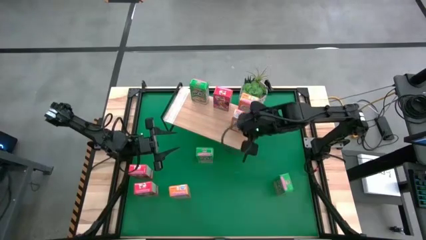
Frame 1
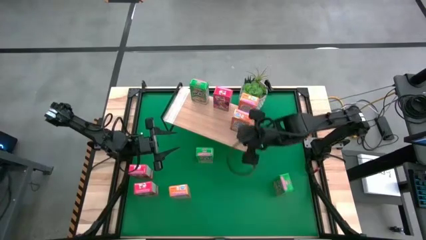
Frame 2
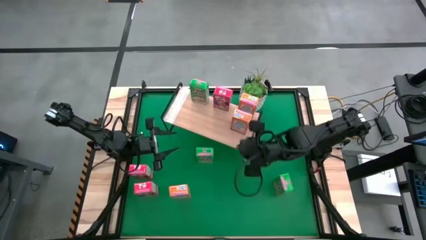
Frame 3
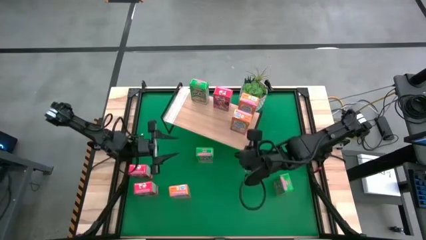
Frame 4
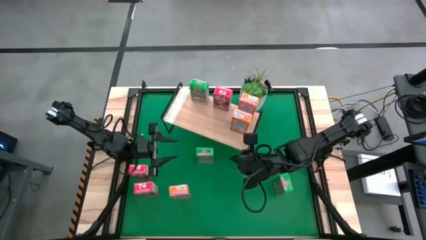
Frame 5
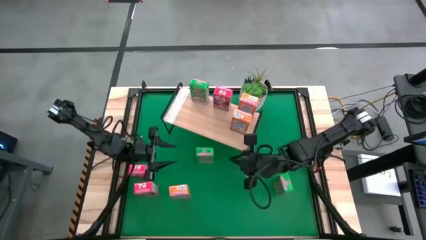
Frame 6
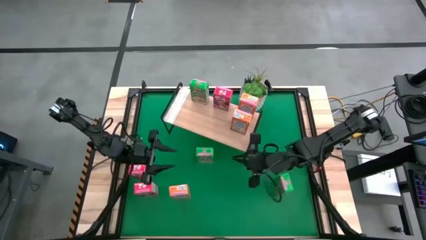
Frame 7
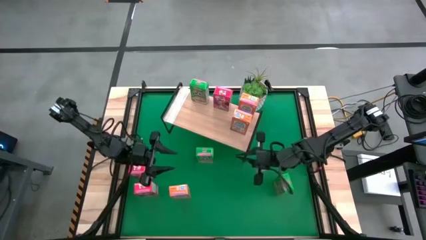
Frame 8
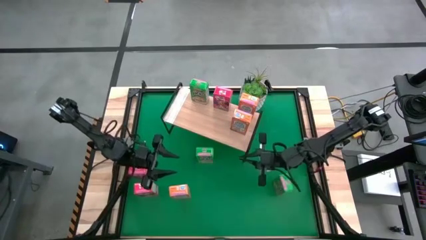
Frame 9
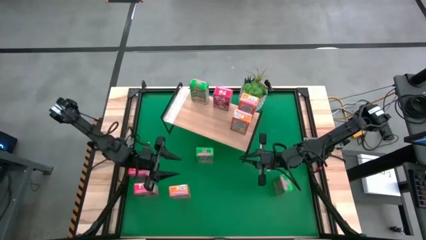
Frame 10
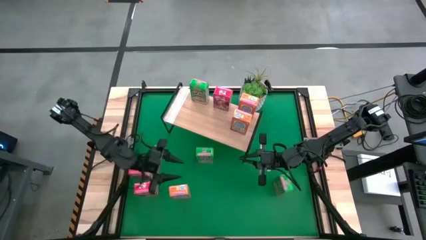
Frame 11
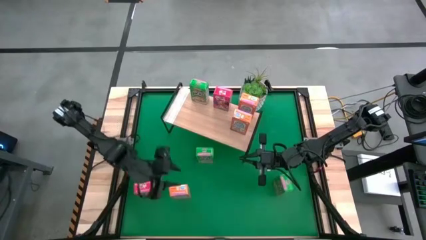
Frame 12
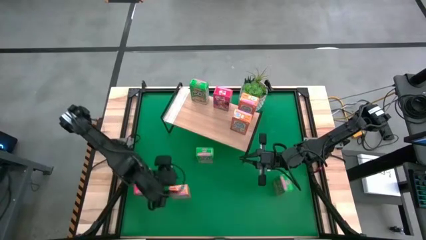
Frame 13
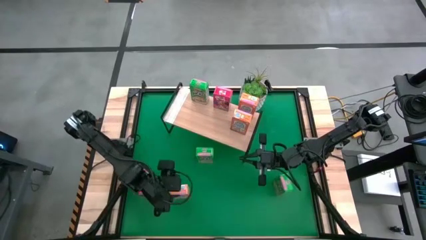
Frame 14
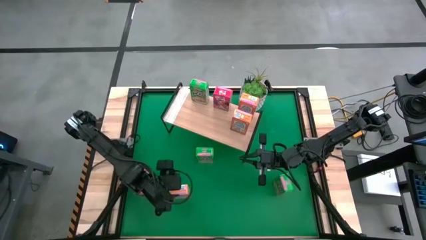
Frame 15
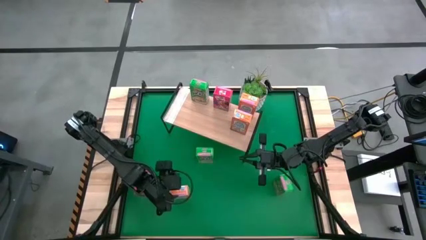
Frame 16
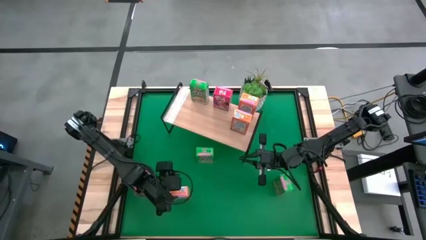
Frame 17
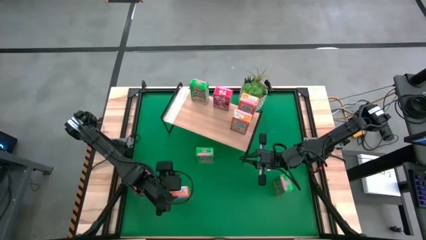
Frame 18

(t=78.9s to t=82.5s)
Task: Stack cereal on shelf
Put the orange cereal box aligned with the other orange cereal boxes on the shelf

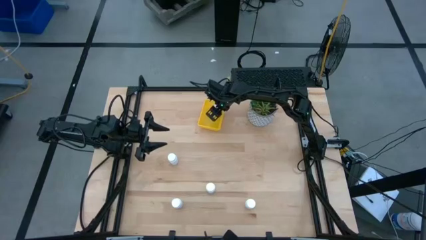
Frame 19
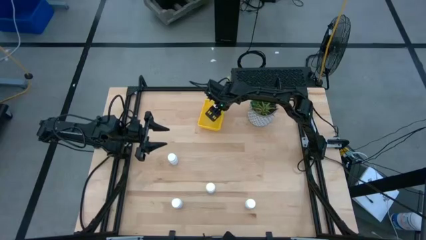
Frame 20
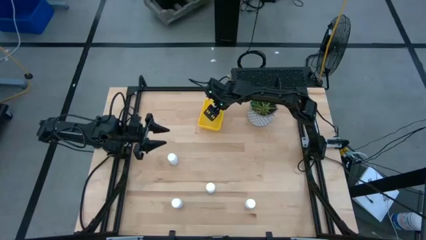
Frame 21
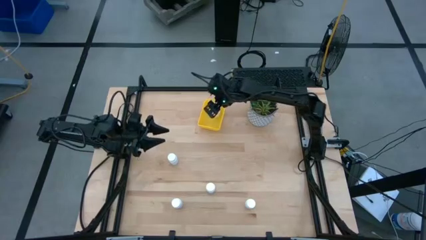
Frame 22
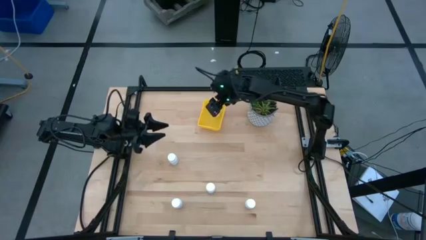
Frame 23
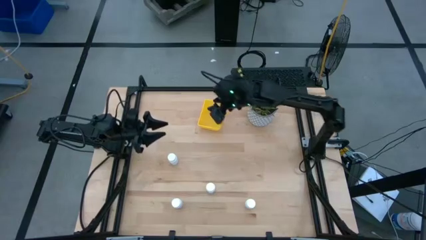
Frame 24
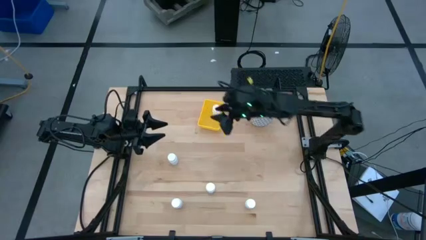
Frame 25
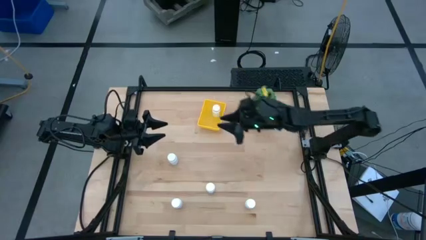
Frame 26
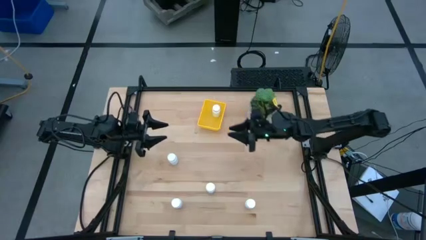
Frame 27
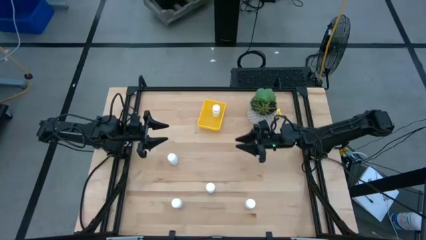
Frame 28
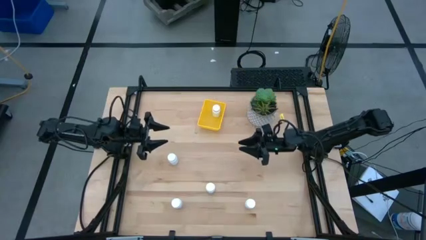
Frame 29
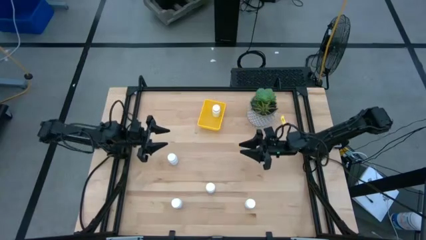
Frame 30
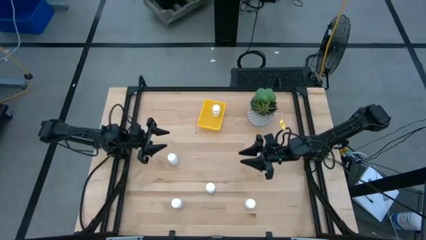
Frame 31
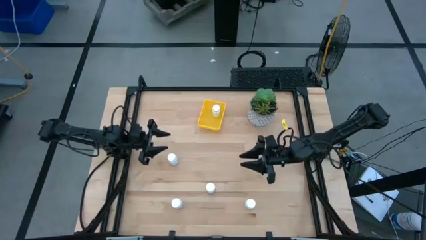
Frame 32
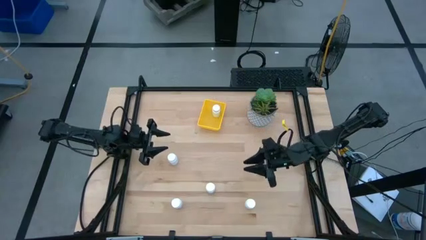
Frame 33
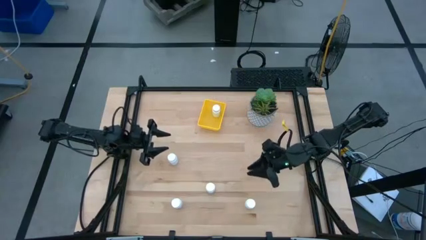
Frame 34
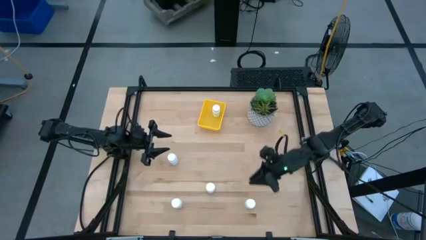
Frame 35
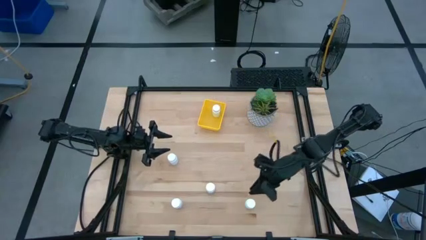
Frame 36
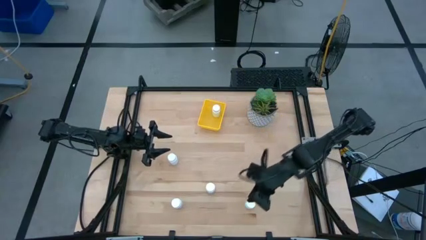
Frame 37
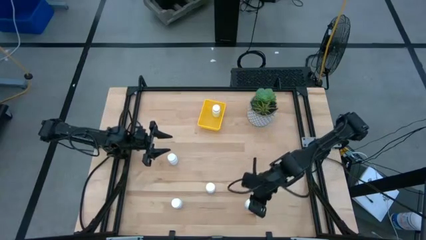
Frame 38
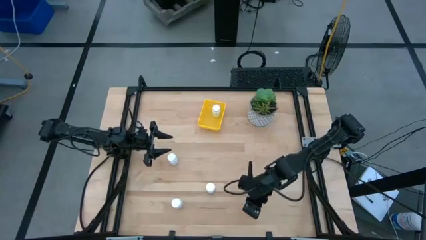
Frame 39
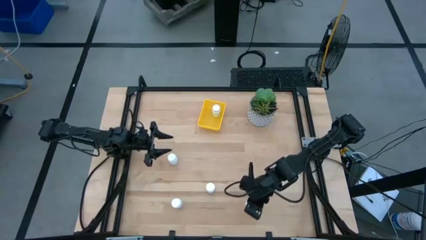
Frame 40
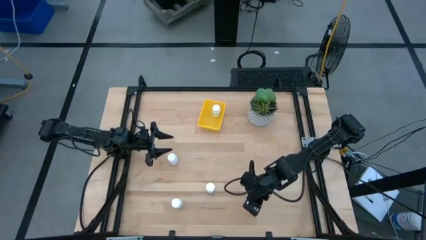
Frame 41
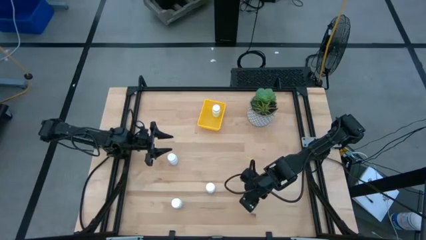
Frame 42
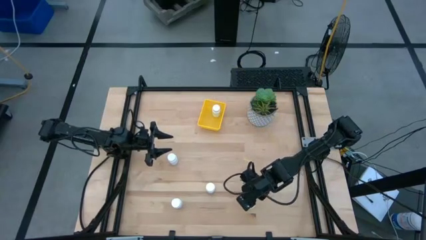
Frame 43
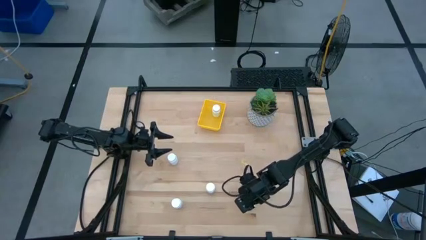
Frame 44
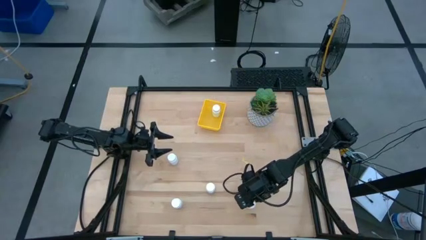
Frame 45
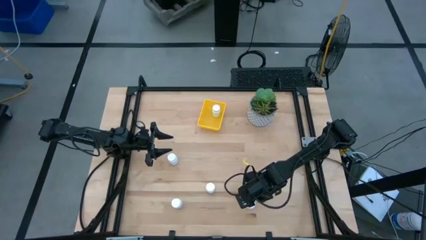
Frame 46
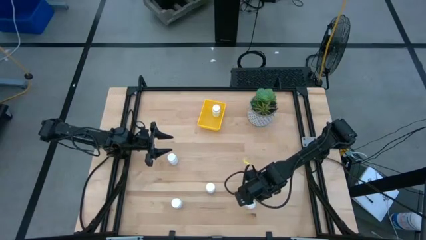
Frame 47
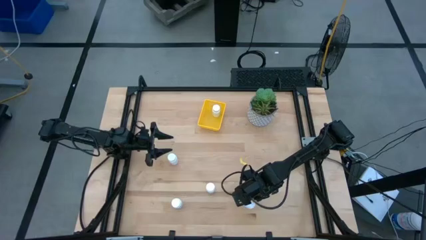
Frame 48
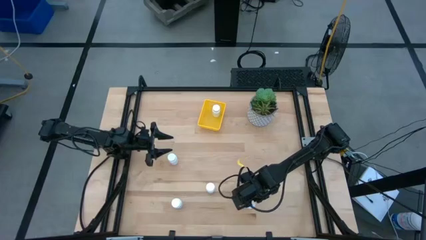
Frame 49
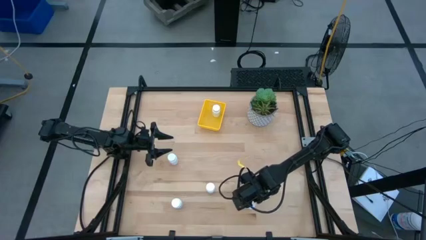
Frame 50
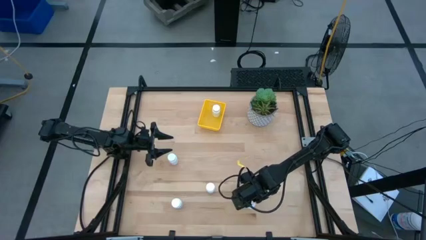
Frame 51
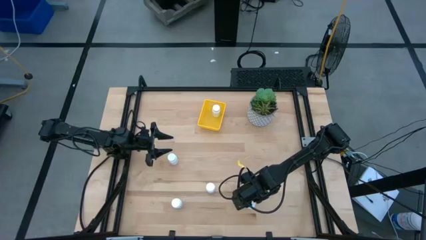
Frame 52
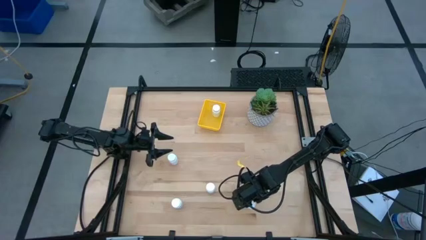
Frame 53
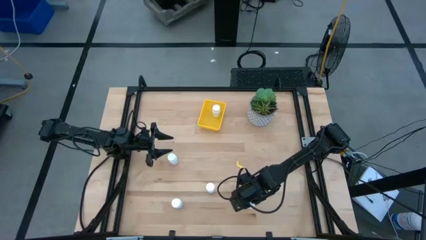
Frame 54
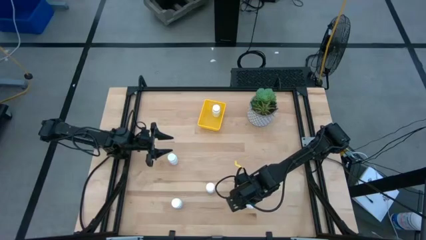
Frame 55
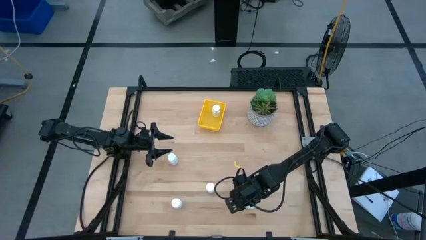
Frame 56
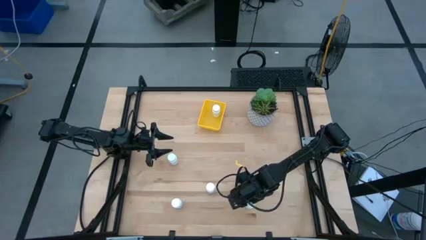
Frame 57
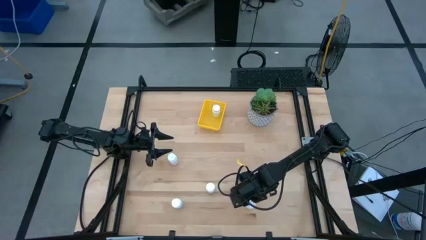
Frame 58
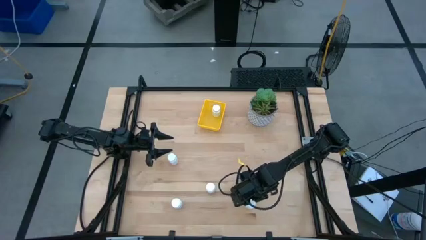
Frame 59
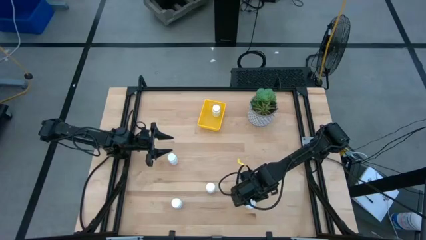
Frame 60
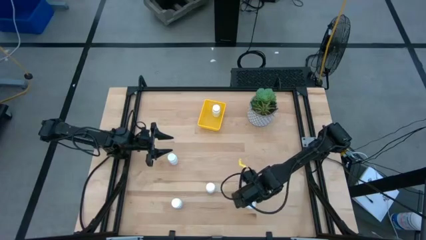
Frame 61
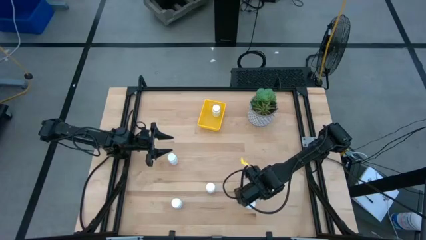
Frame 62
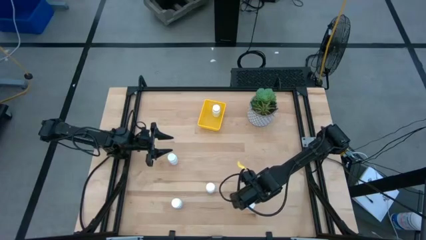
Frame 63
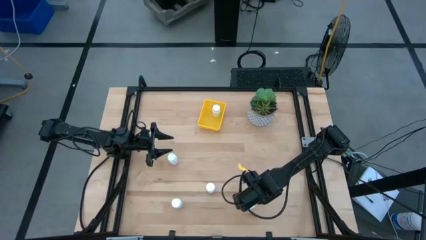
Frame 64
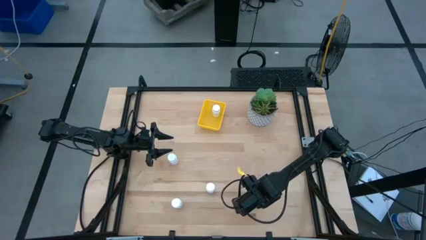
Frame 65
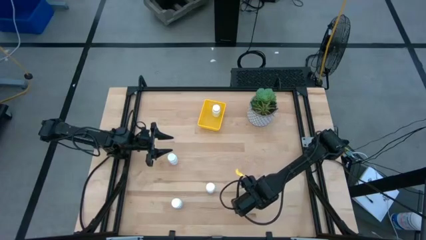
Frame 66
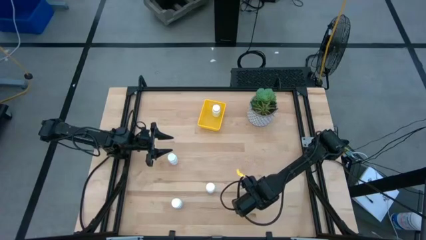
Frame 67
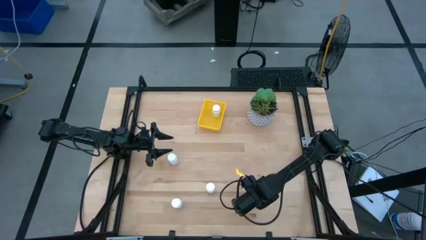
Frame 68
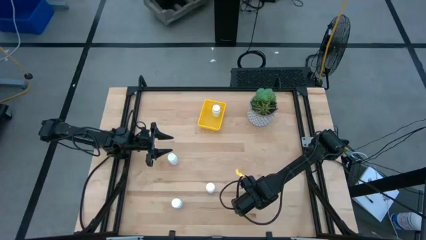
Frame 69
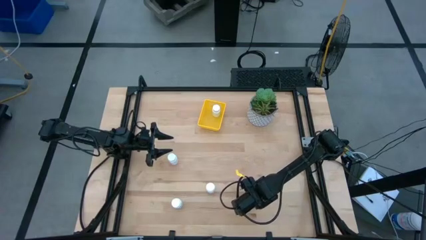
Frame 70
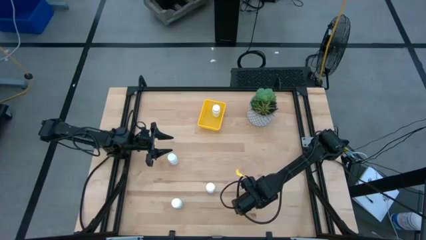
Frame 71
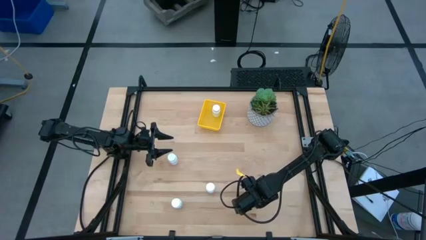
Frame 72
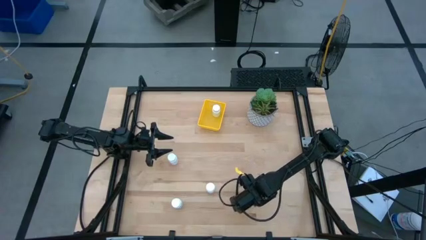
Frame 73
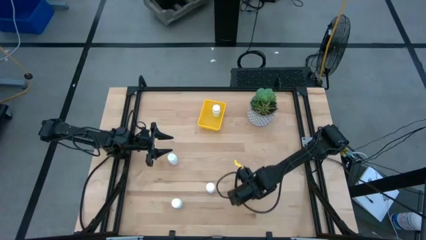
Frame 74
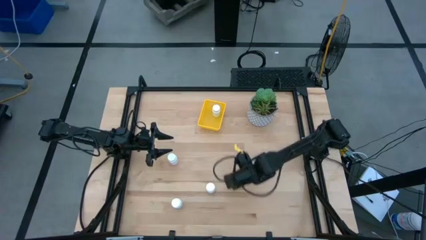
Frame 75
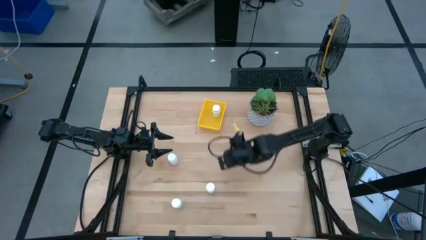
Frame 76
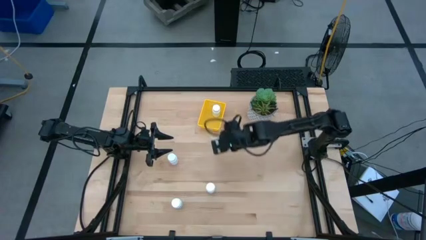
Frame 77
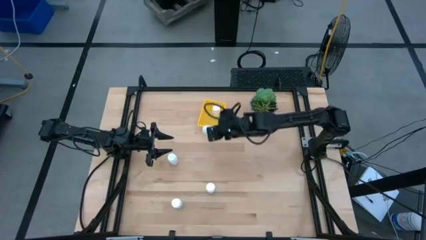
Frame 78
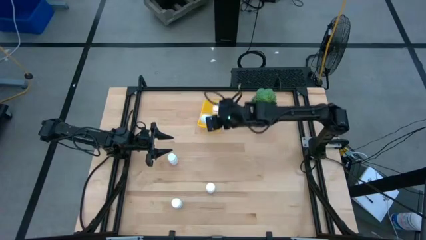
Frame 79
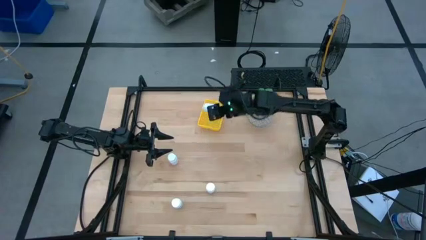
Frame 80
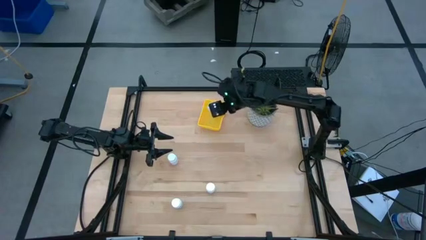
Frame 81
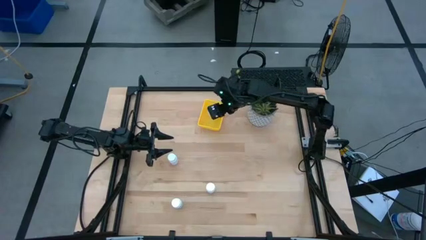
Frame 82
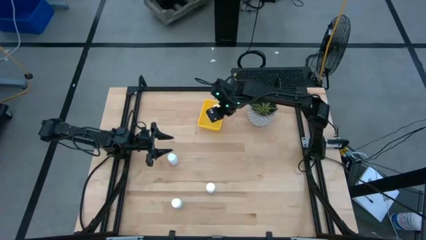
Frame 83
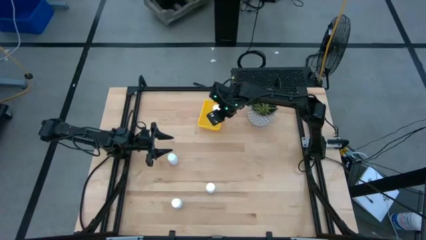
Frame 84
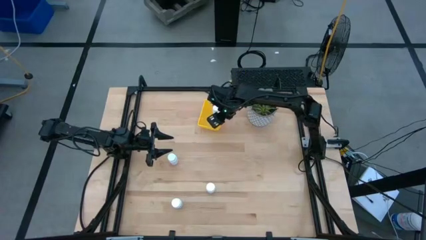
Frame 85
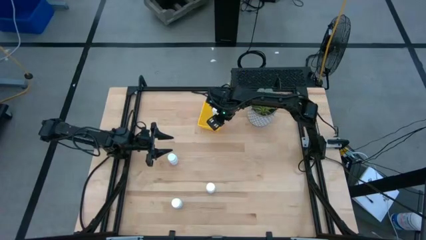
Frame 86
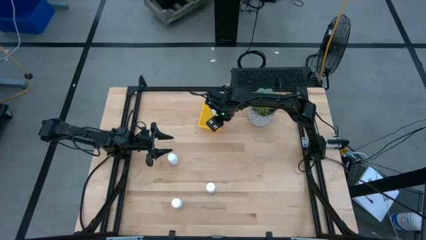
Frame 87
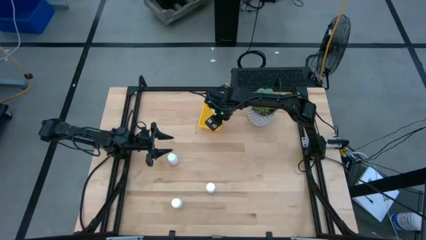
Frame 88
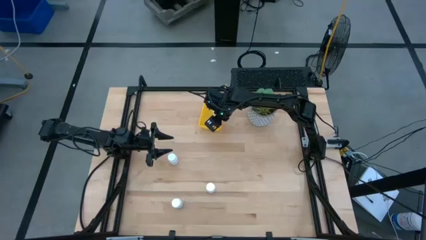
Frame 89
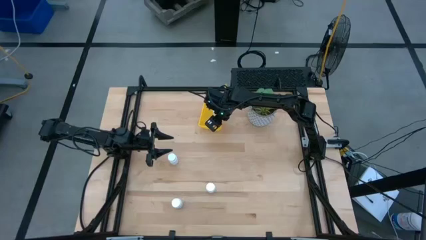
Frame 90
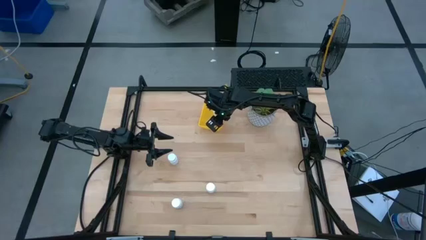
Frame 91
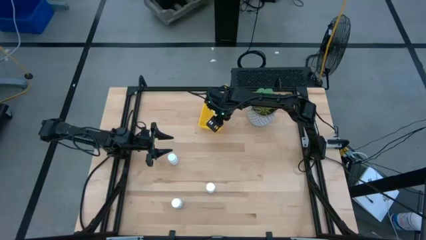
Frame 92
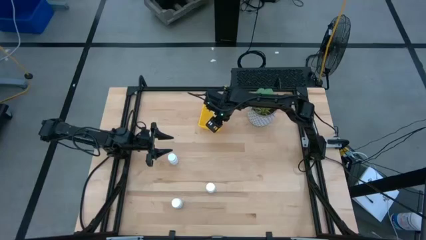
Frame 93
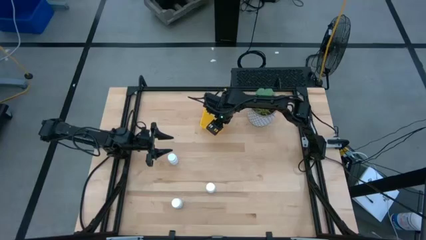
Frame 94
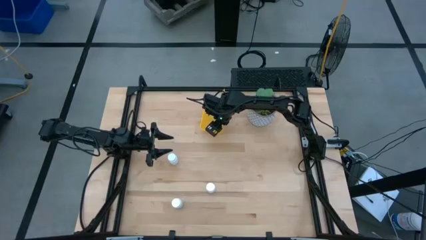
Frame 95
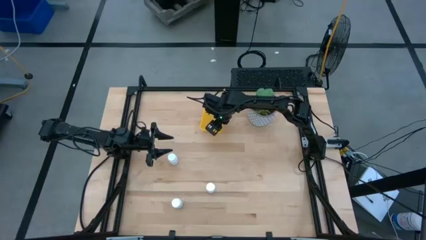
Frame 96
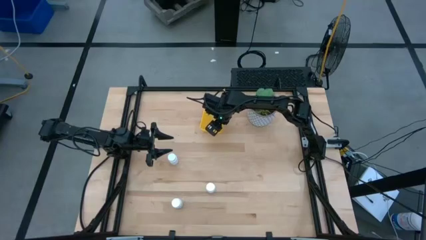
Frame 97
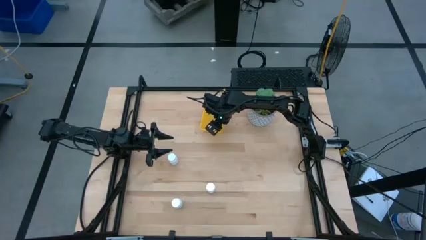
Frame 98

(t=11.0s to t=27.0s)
Task: Pick and place pill bottles into a basket
Put the white pill bottle into the yellow basket
